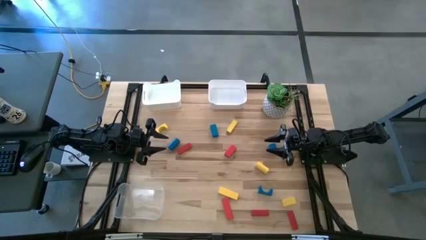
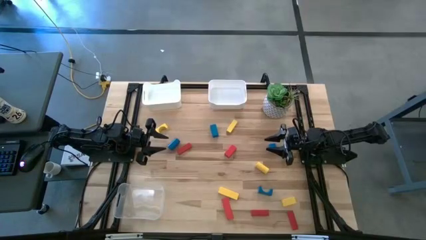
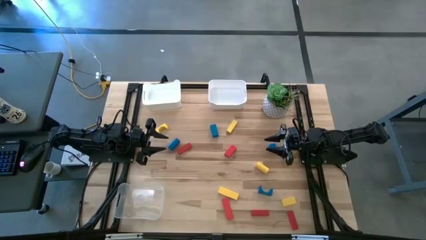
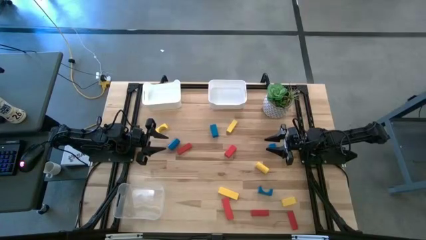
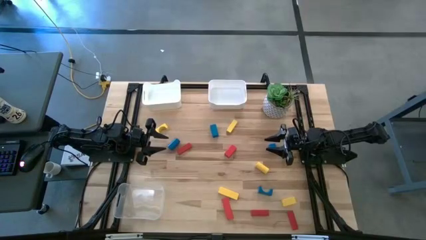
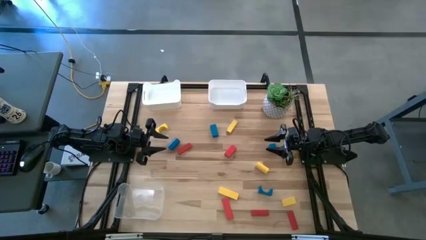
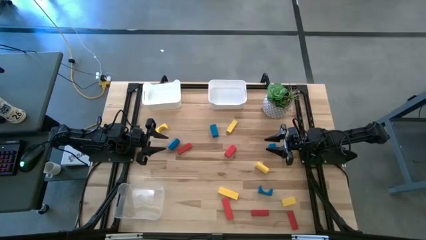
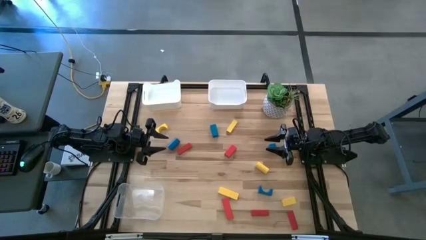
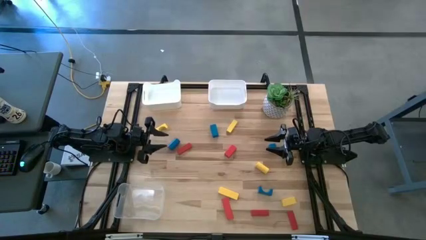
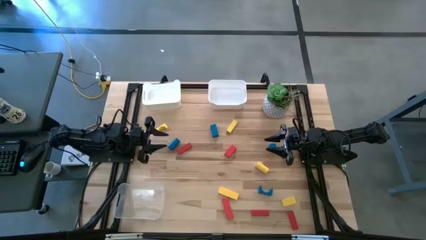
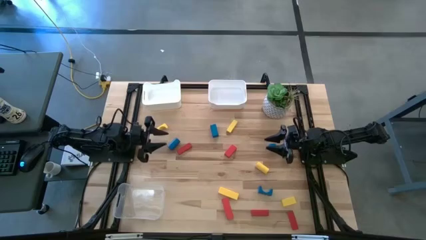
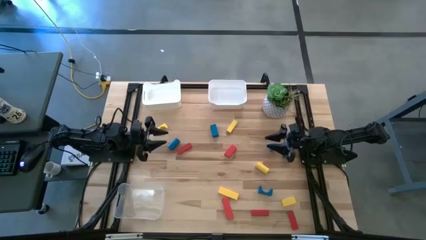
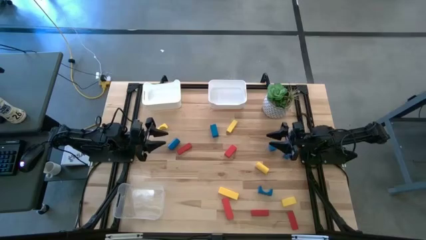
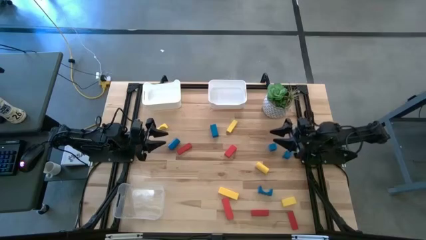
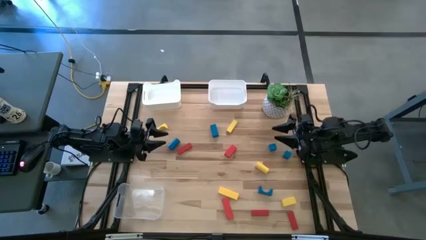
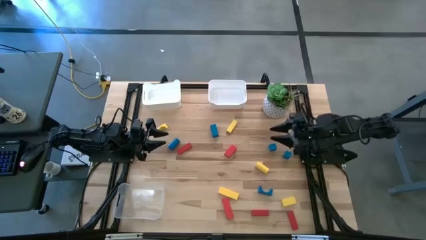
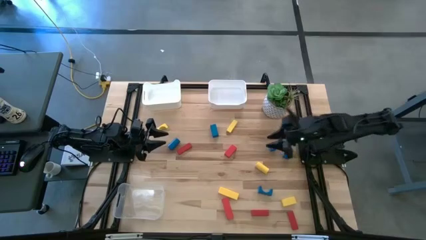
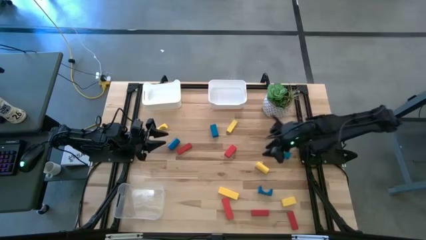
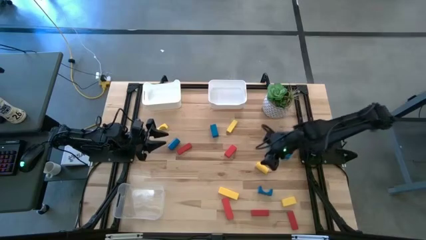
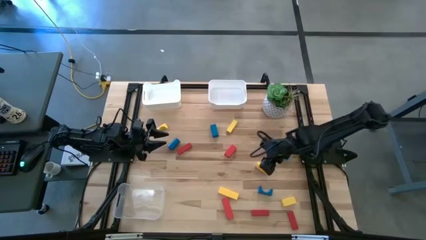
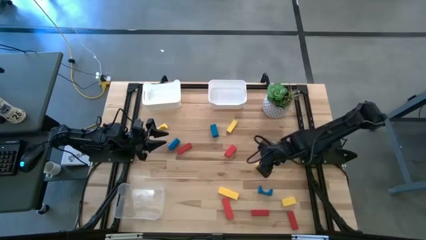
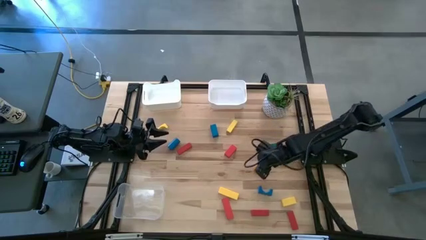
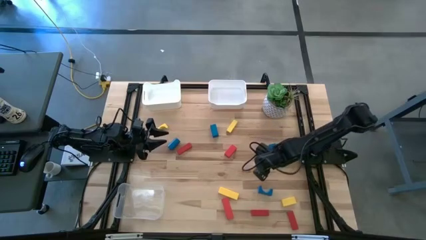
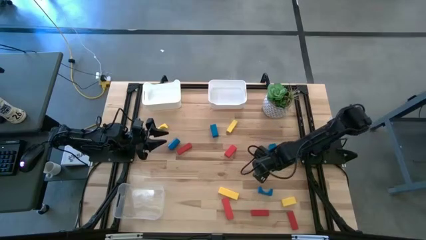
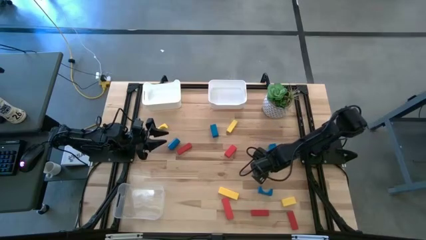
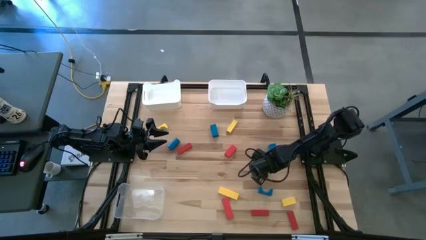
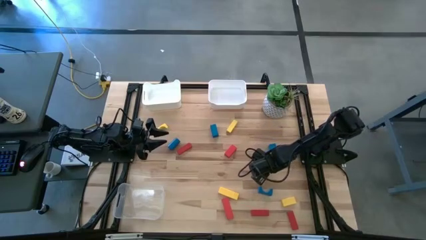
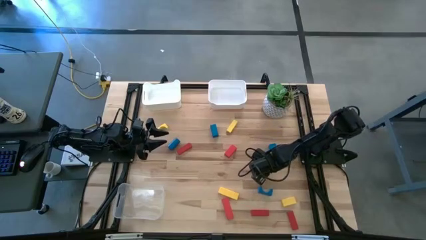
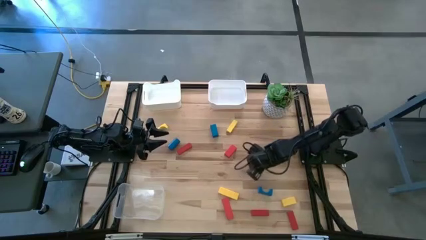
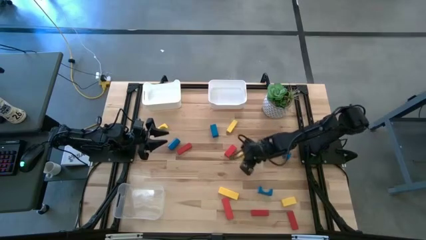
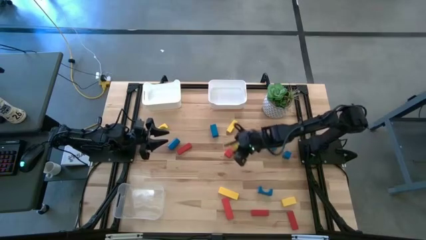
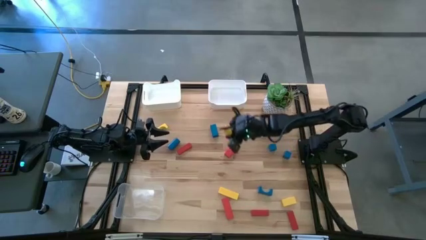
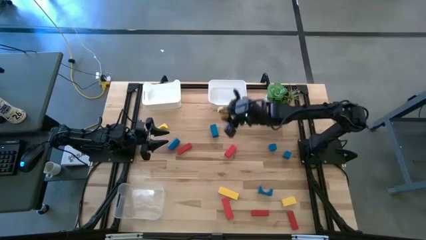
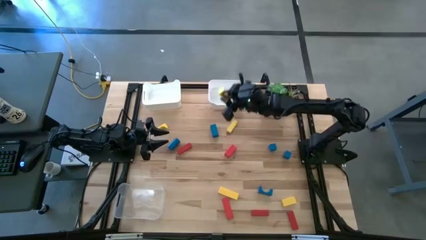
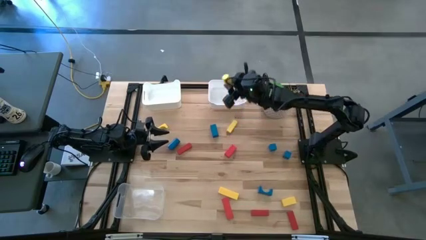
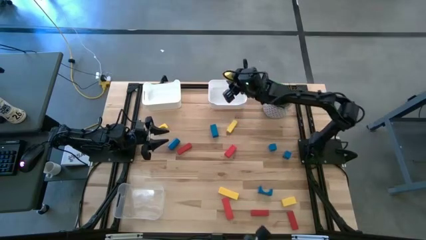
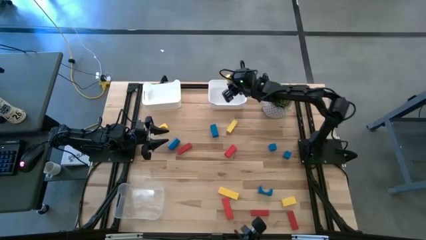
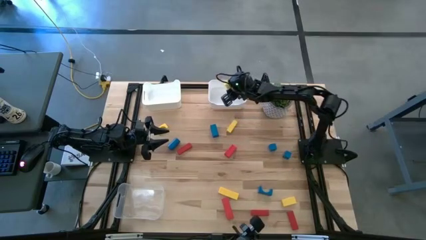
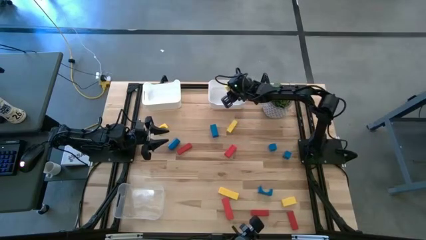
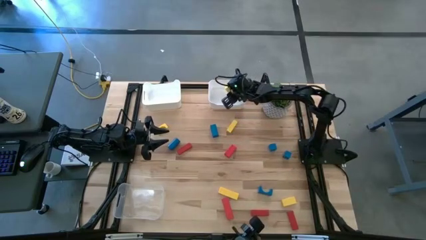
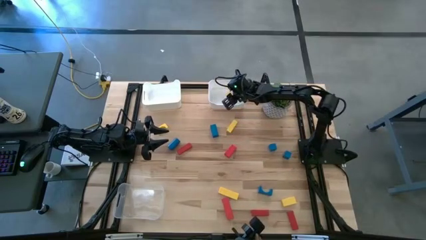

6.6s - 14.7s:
Task: Sort & place blocks by color
Put the yellow block into the right white bin

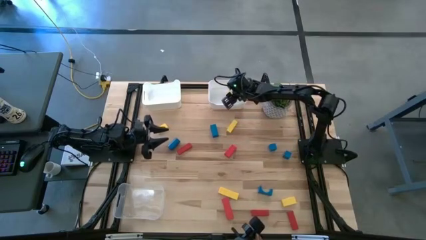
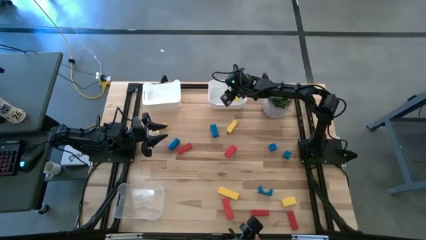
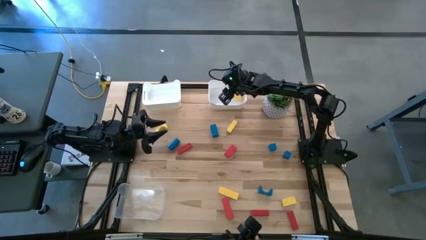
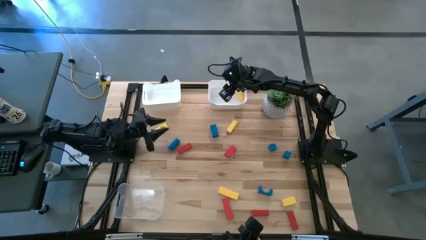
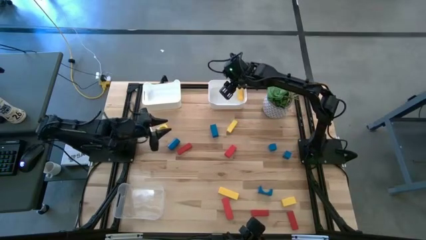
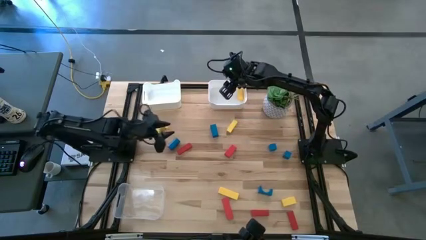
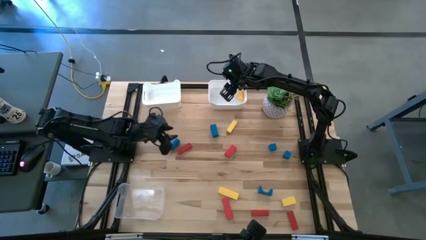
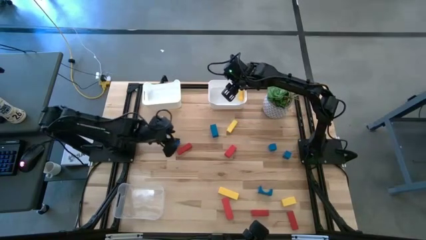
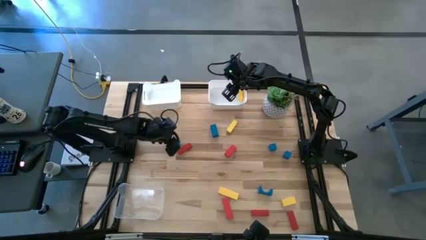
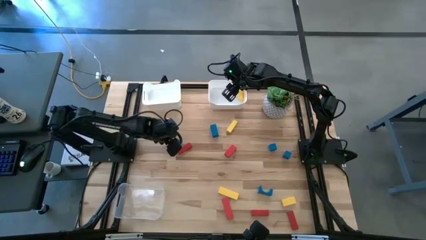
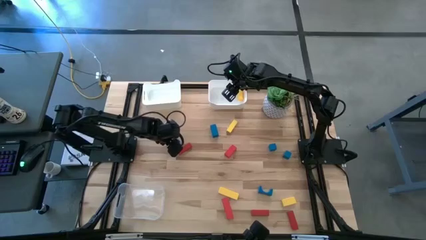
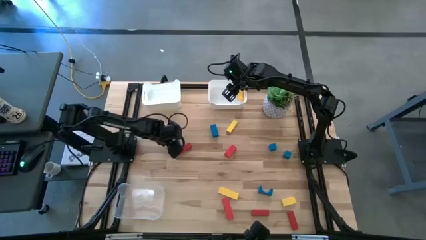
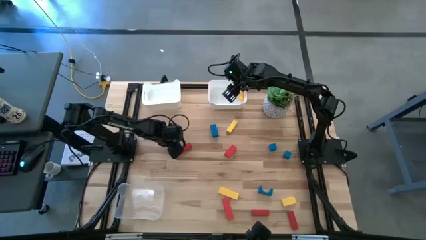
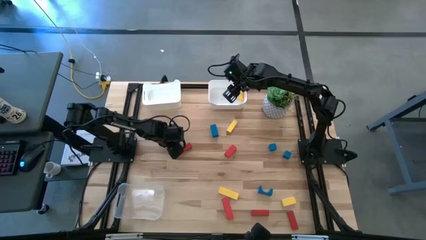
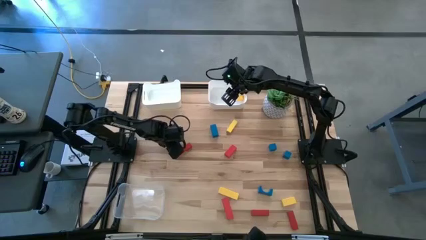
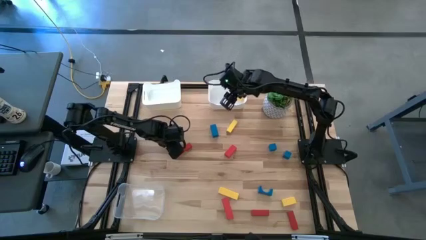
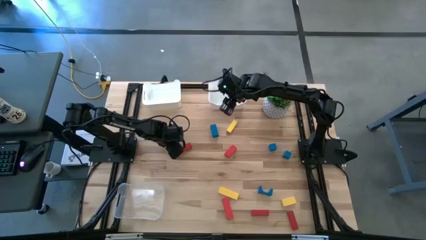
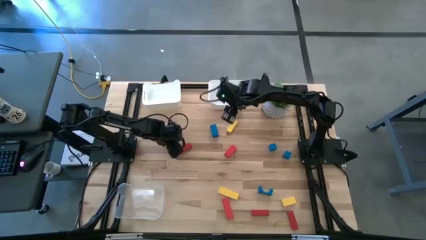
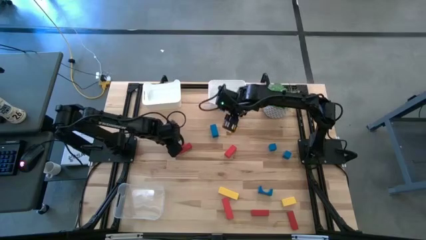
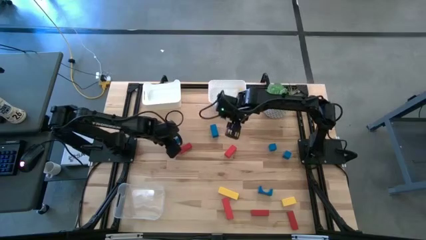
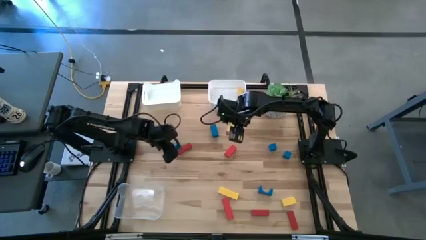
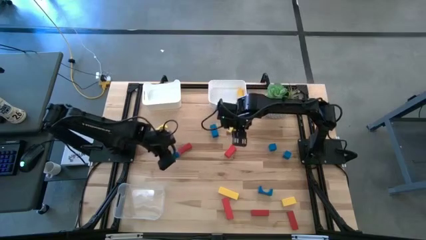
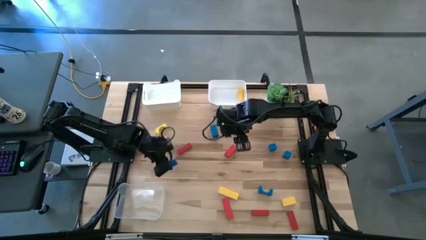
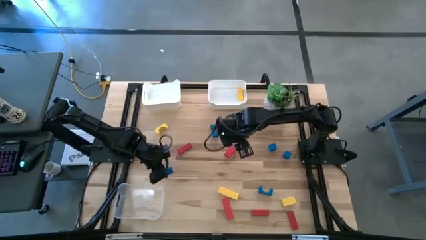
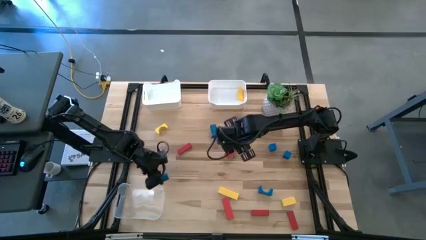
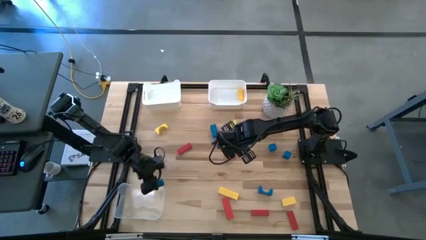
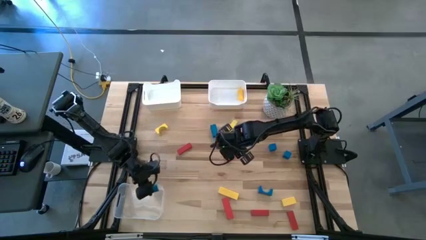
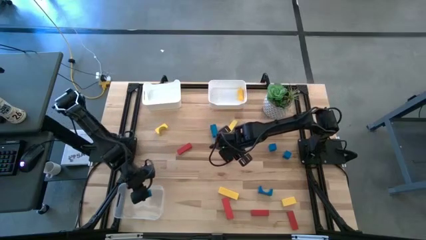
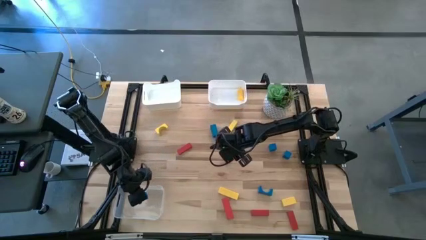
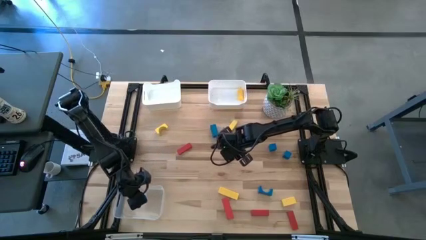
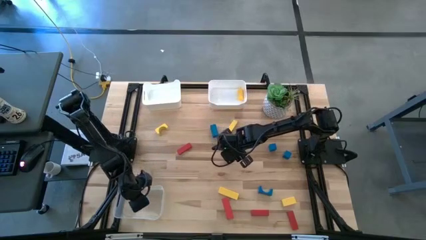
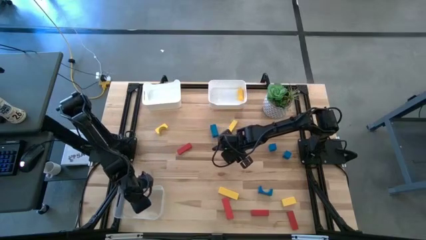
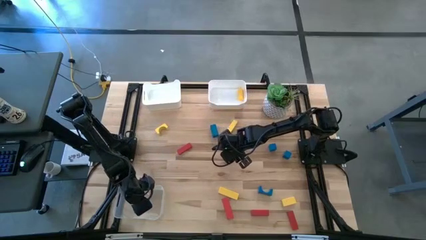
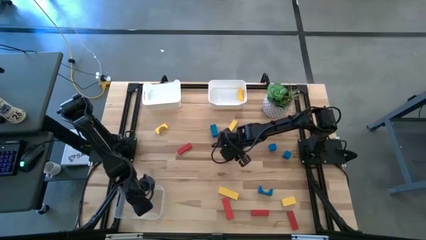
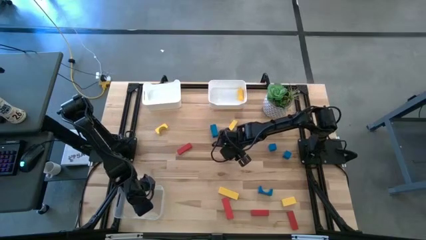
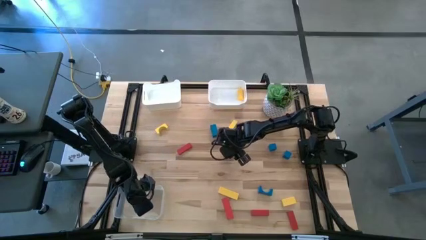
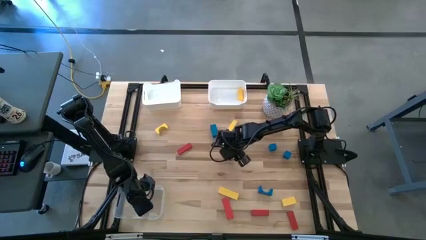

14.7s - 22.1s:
Put the blue block into the transparent bin
